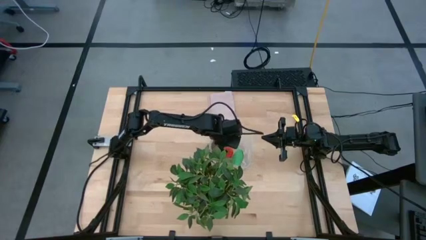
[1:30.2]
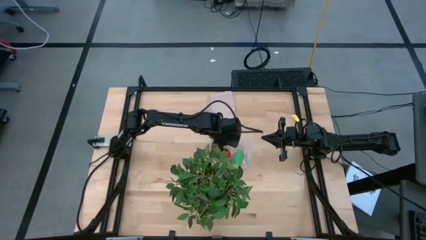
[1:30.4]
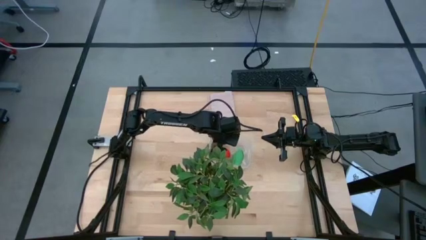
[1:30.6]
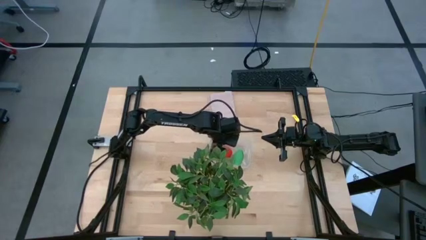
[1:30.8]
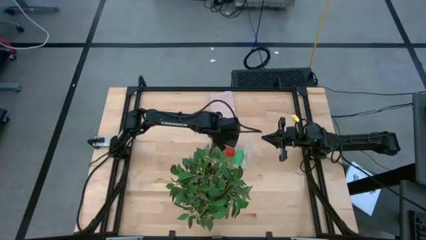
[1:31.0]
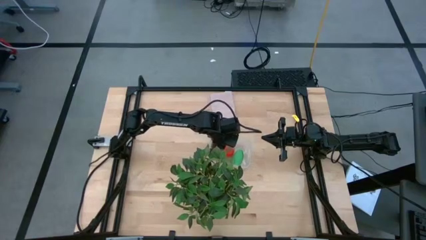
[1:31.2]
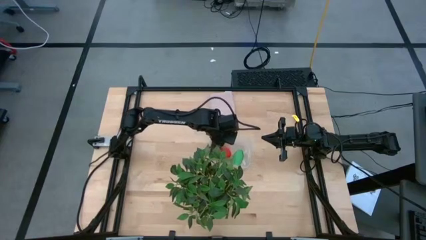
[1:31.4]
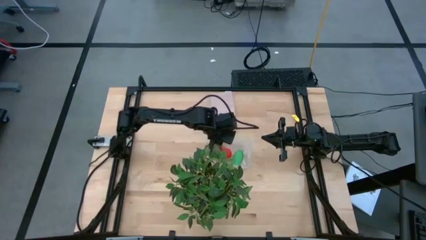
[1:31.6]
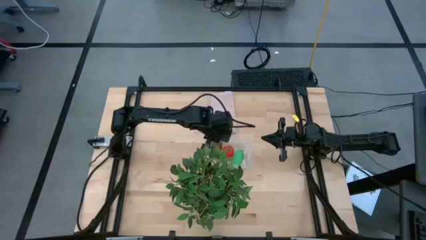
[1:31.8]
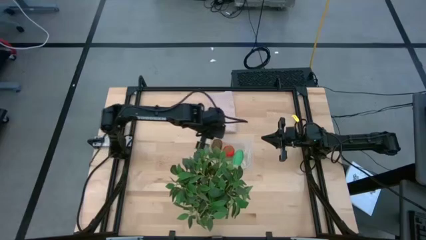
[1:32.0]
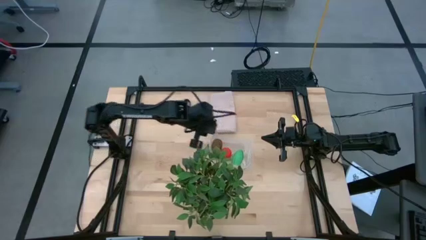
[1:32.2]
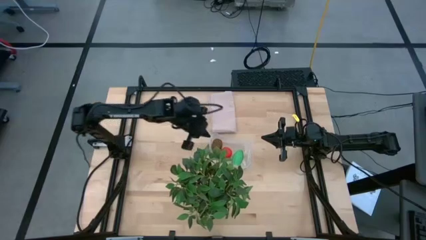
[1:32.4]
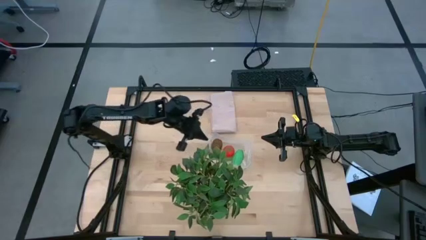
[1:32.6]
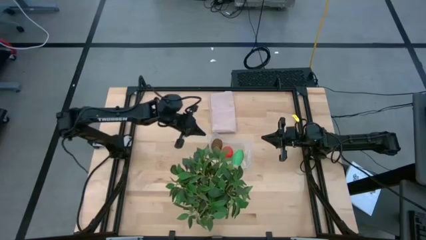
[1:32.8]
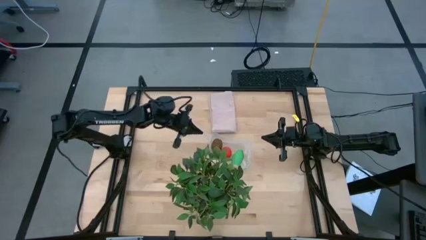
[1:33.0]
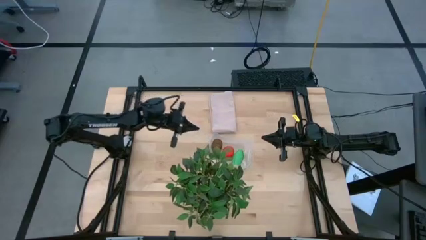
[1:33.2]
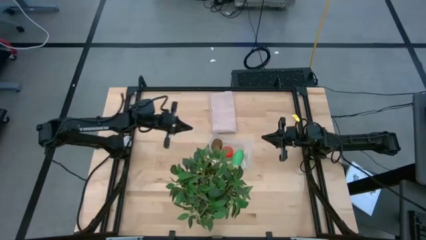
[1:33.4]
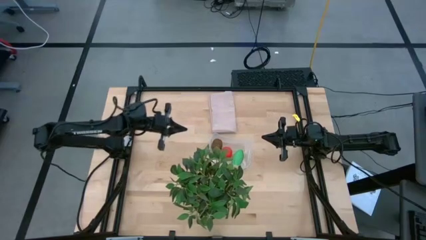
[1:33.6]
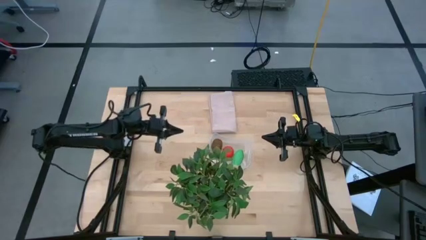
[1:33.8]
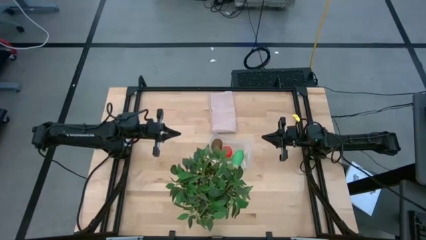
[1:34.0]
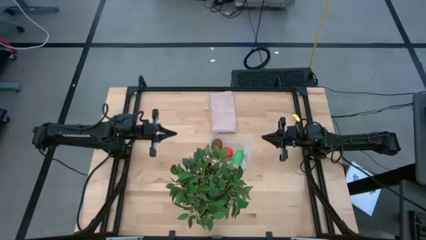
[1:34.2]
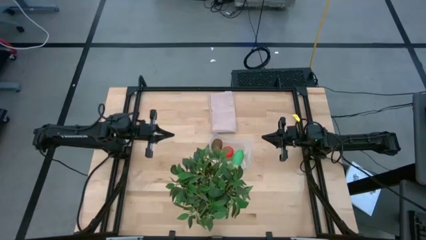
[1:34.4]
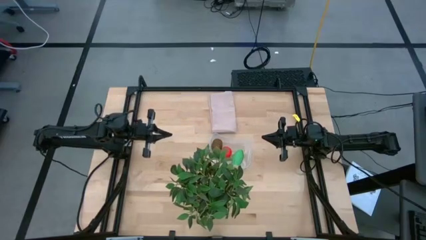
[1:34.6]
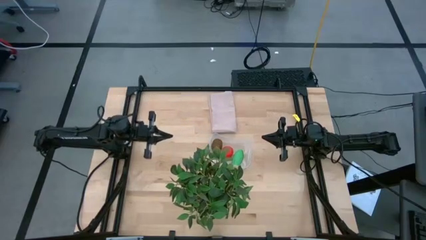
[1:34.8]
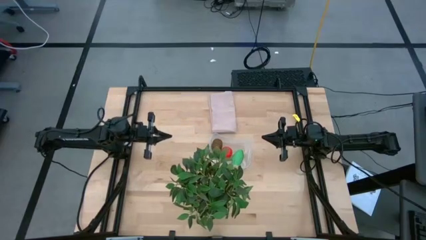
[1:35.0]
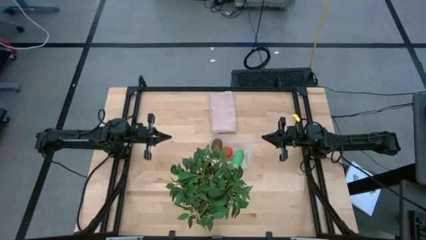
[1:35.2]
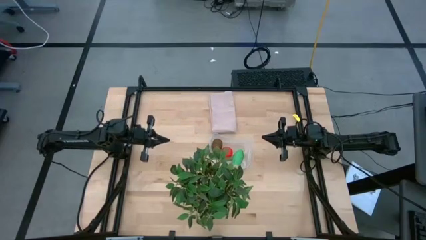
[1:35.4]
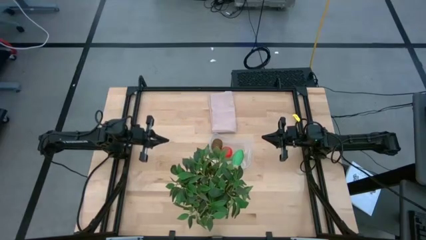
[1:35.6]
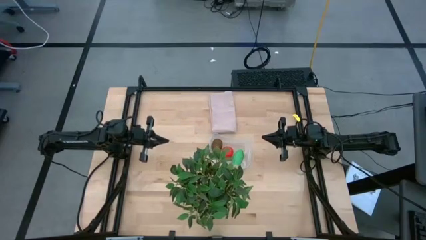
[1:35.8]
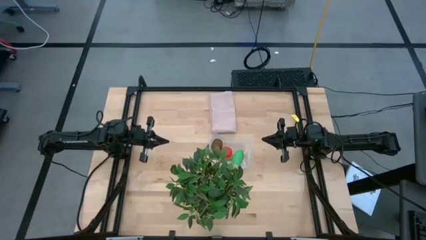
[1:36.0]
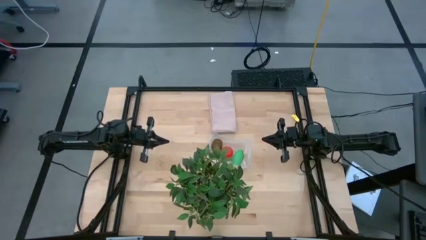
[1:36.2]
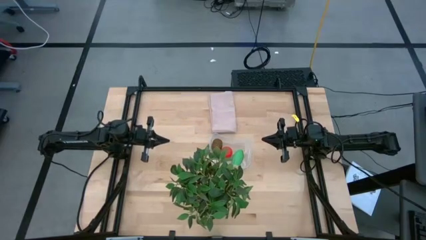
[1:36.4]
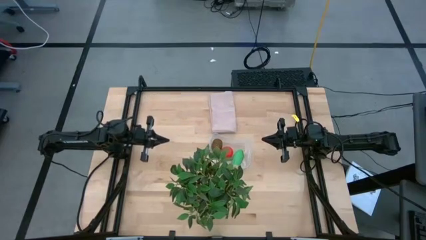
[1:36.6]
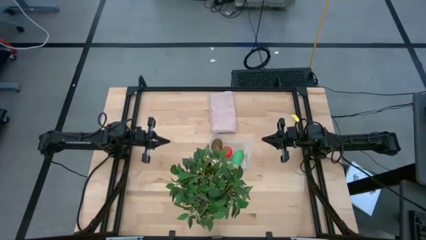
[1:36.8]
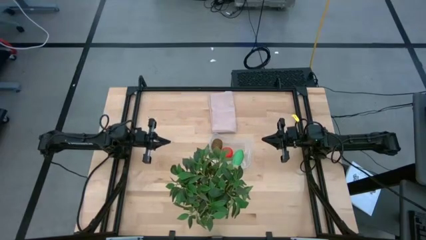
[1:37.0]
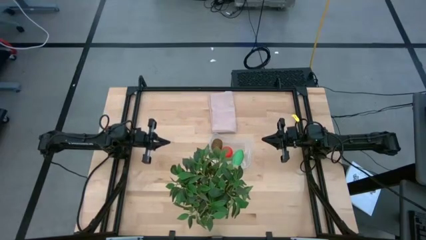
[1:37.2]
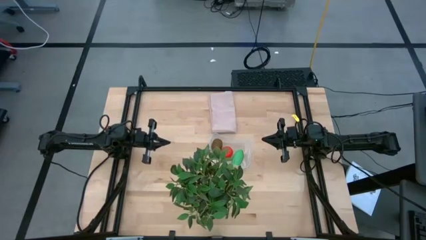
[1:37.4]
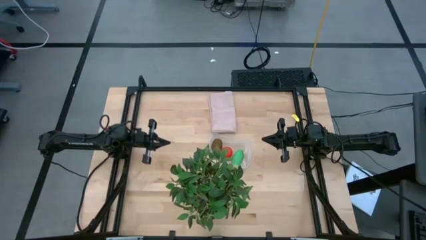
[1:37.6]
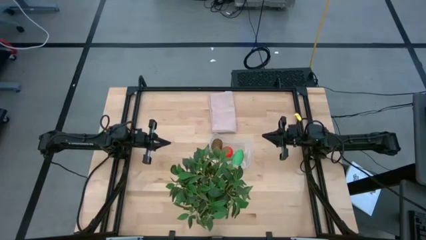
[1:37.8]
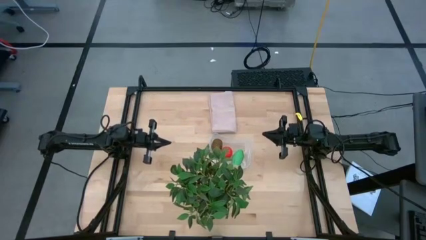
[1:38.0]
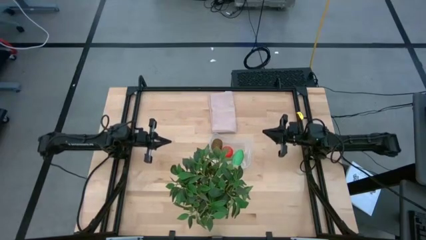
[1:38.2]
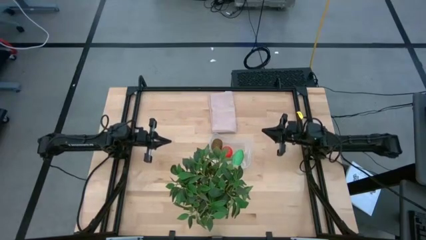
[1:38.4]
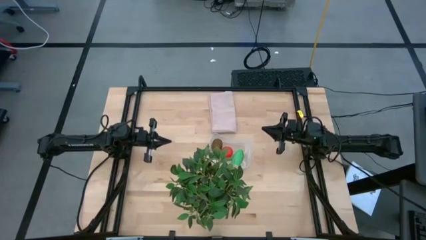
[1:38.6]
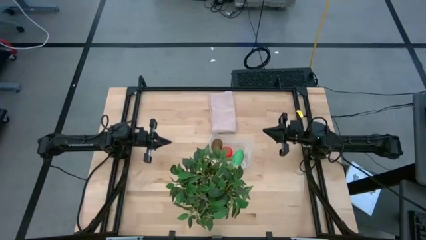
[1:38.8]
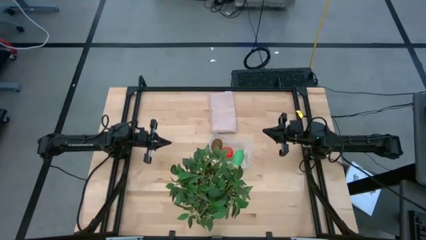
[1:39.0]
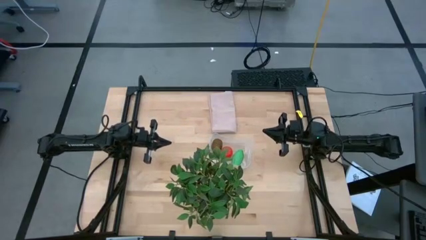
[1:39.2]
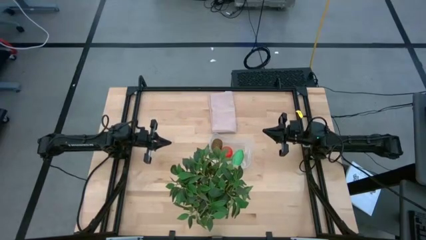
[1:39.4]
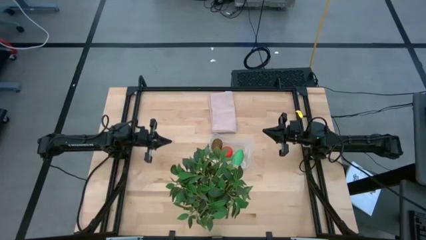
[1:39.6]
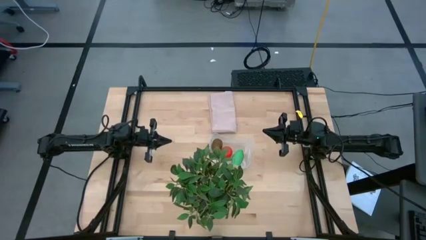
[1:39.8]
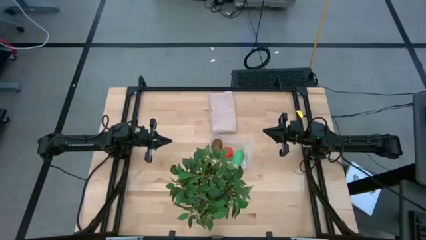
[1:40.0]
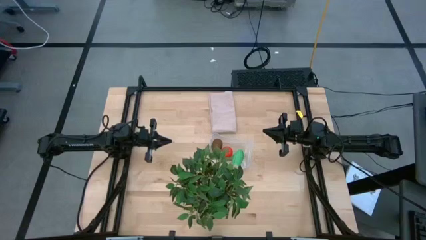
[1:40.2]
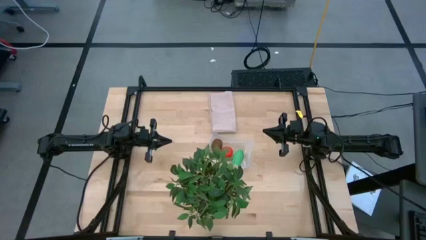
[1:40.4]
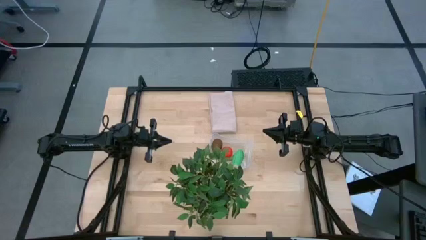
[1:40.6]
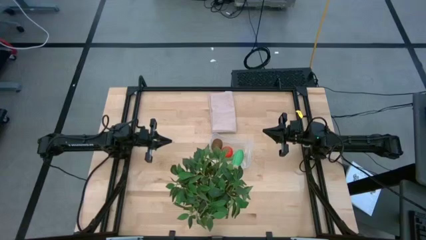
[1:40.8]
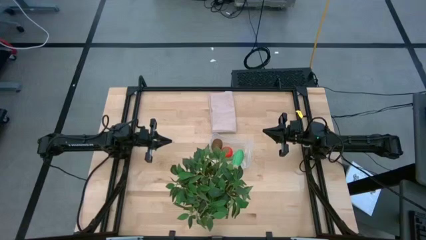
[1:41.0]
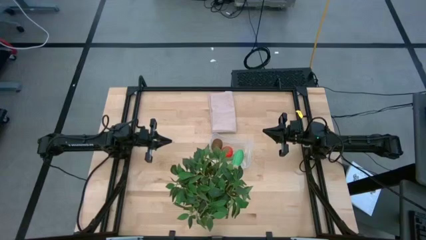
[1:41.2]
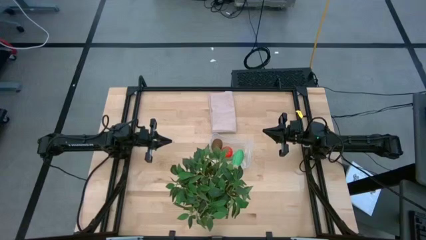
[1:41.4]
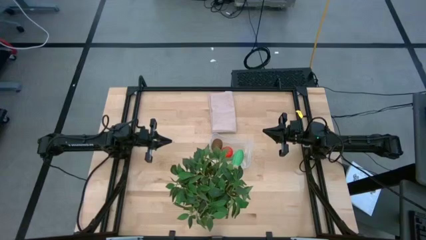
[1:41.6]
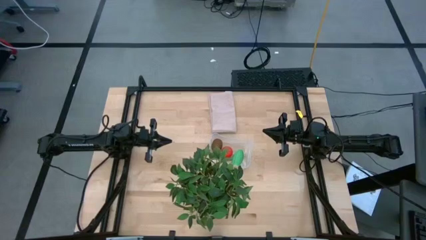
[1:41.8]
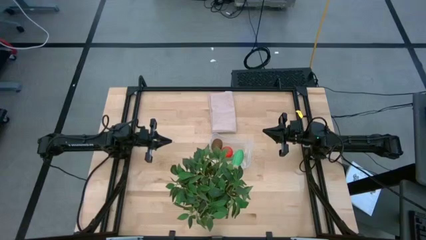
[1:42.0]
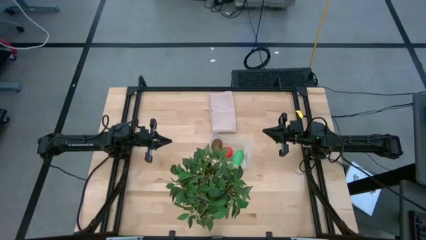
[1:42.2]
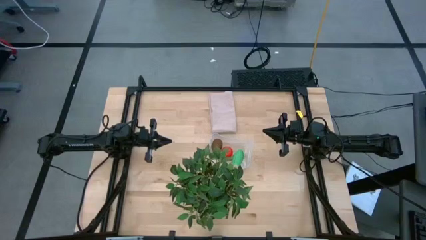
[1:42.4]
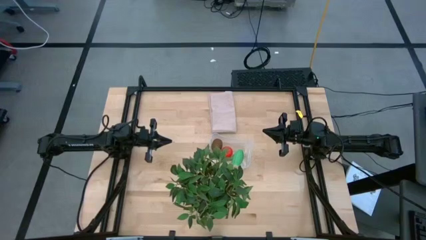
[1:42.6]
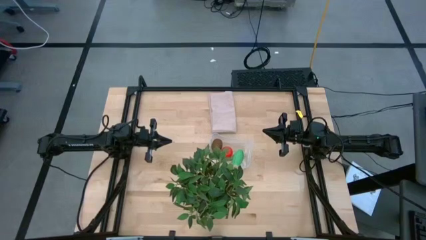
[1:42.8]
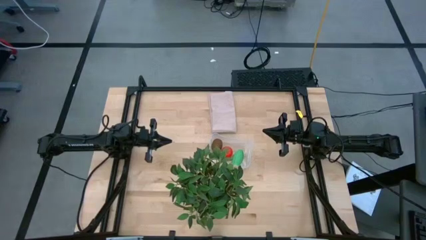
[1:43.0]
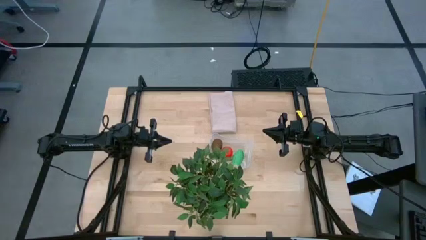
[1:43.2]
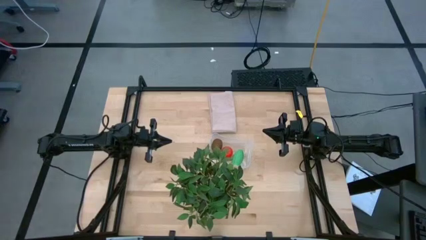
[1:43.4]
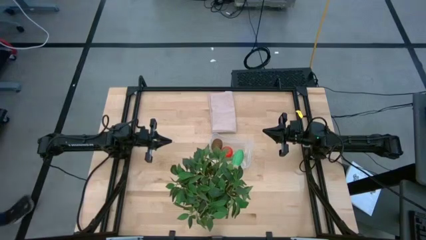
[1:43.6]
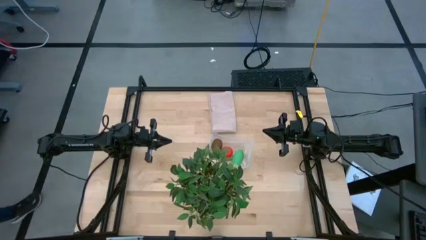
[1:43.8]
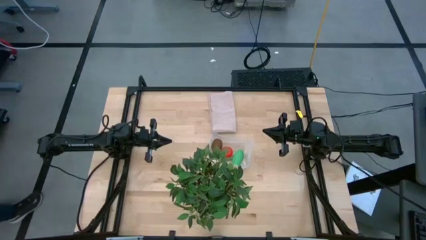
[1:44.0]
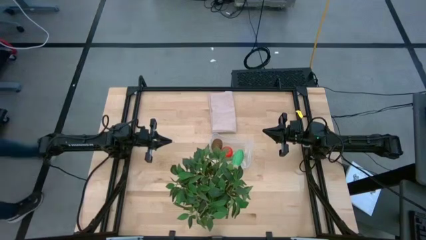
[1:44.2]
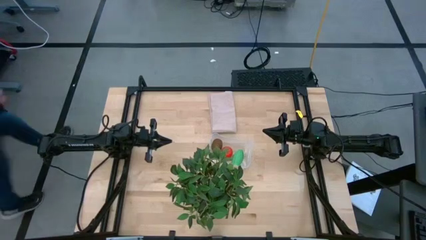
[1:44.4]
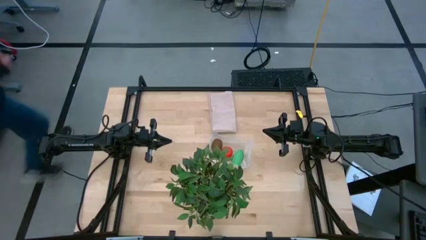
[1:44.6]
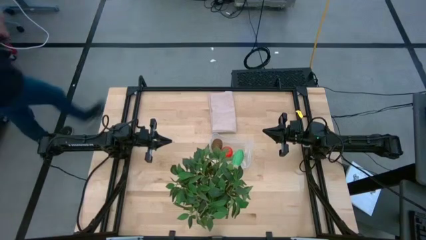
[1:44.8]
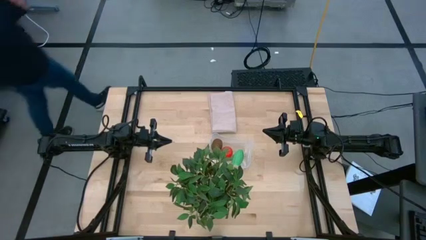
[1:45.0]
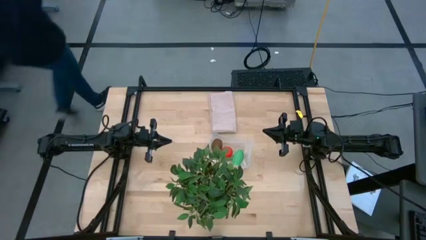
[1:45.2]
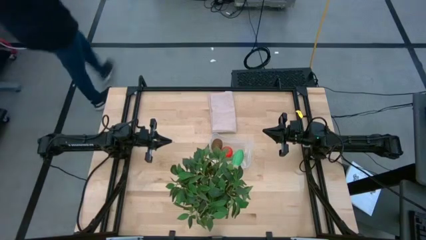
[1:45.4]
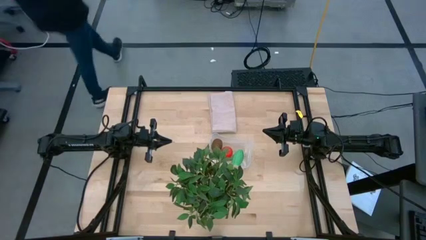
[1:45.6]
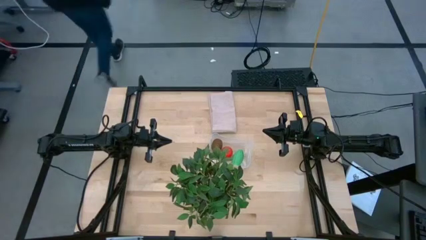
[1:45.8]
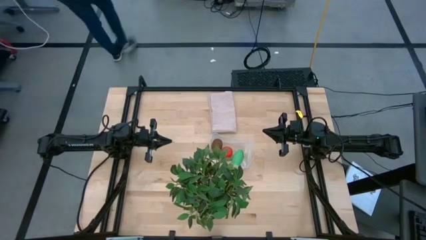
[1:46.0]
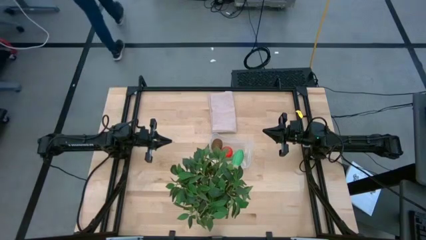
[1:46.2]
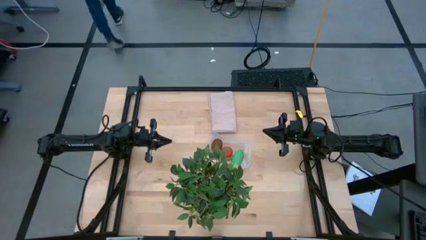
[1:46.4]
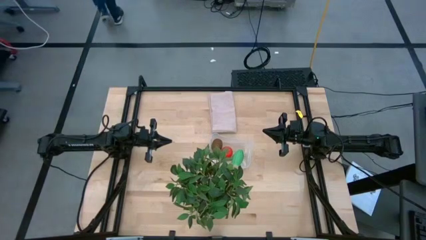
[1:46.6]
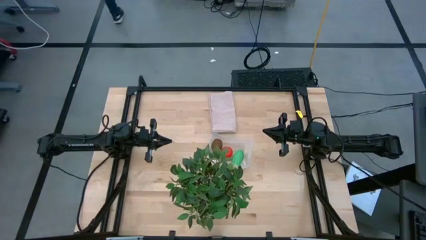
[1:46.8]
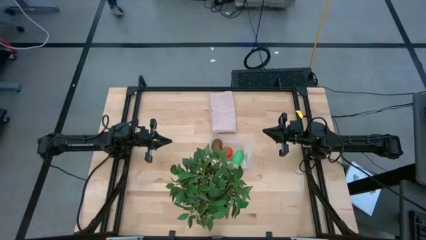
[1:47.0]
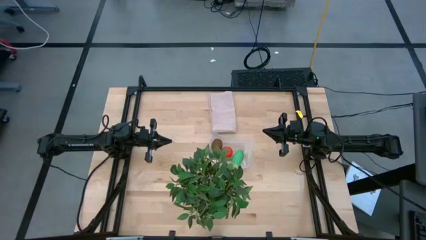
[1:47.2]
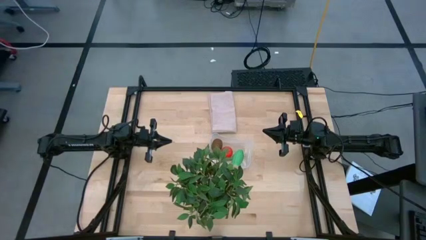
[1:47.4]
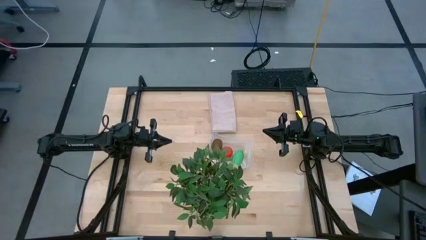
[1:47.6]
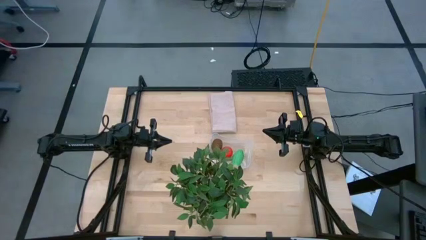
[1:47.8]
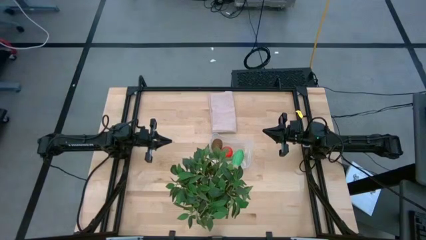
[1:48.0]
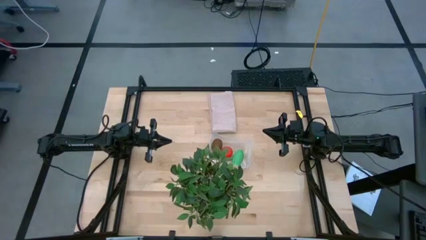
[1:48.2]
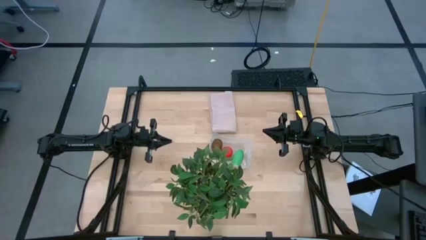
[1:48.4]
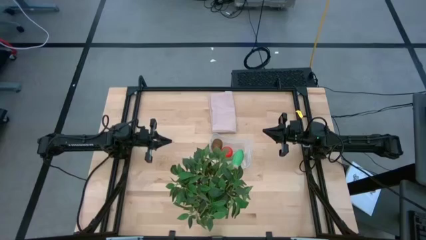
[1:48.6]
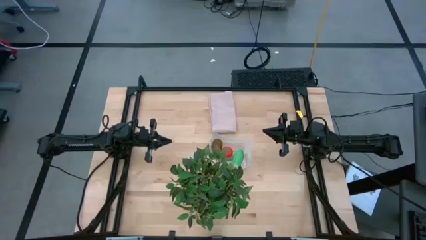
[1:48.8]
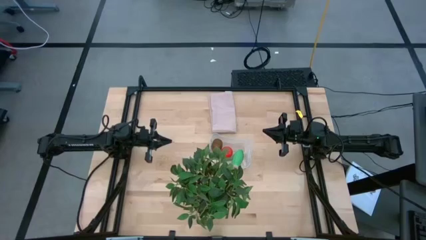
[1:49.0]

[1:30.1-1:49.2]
Task: Pick and placing Produce into tupperware
Return to home position
